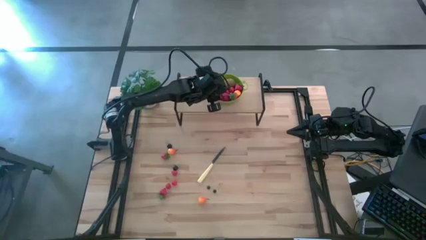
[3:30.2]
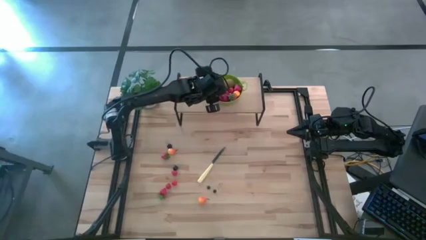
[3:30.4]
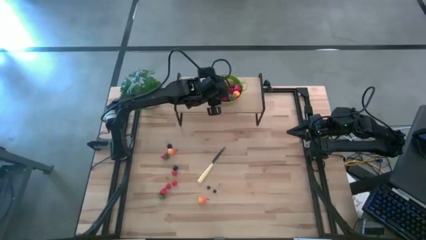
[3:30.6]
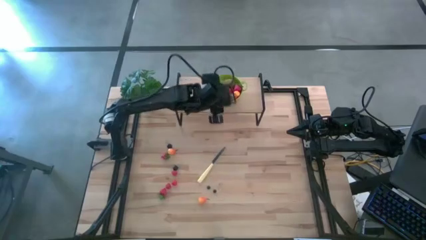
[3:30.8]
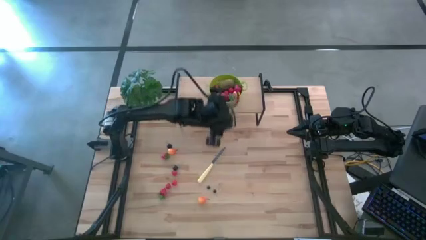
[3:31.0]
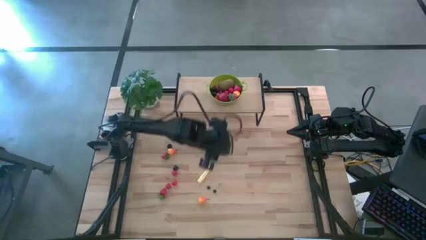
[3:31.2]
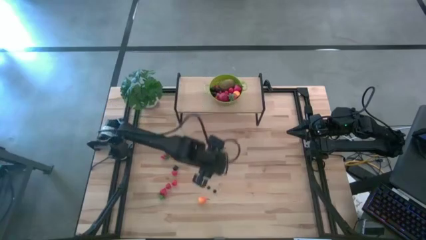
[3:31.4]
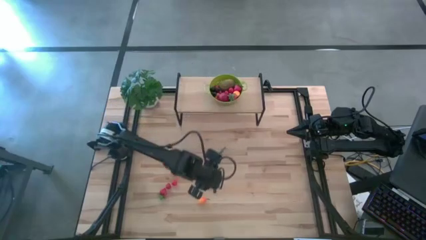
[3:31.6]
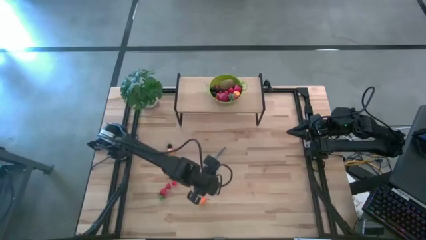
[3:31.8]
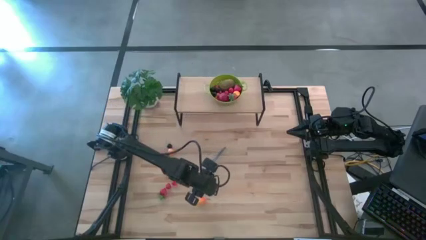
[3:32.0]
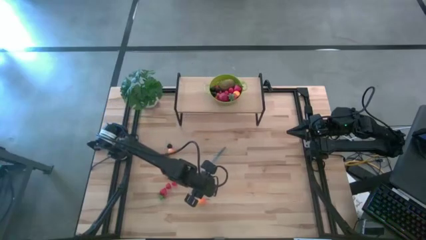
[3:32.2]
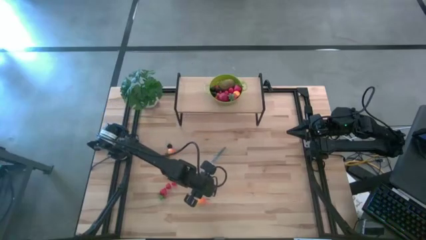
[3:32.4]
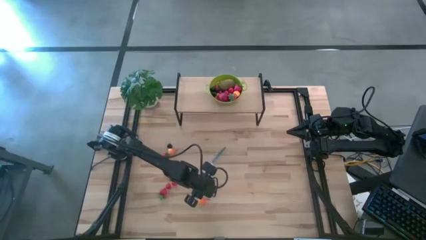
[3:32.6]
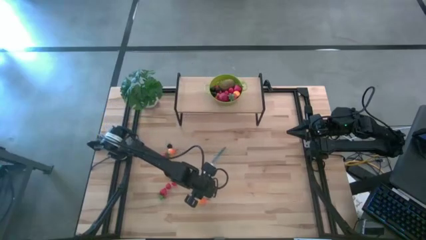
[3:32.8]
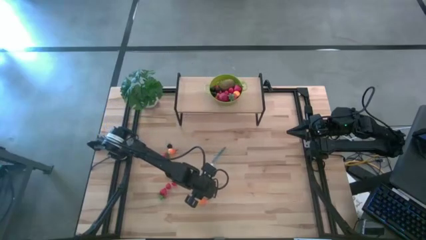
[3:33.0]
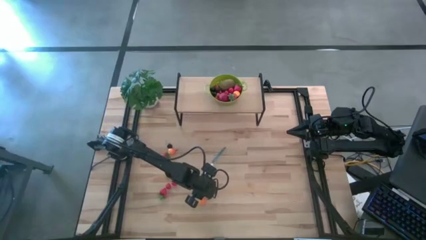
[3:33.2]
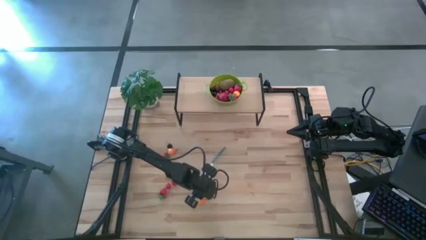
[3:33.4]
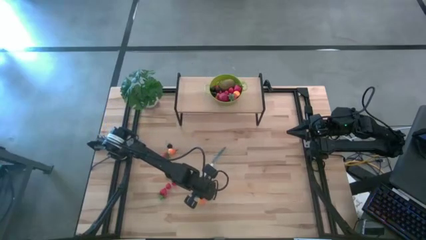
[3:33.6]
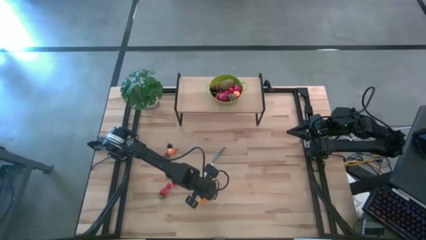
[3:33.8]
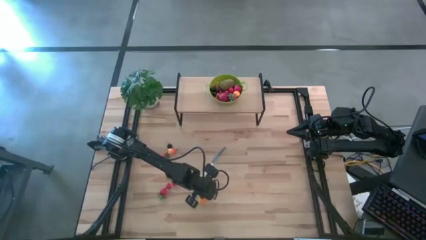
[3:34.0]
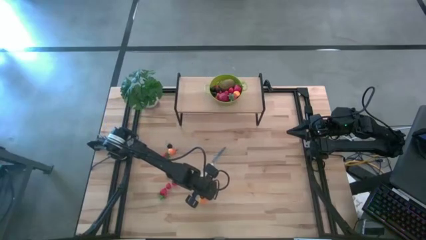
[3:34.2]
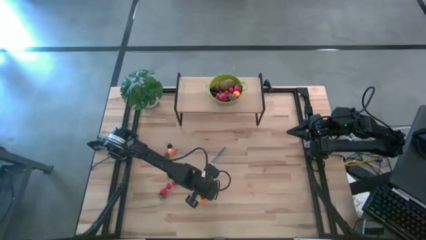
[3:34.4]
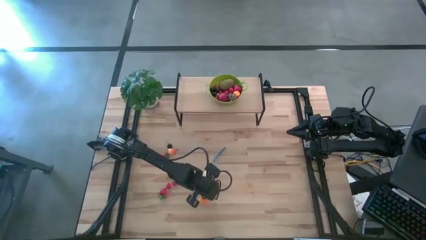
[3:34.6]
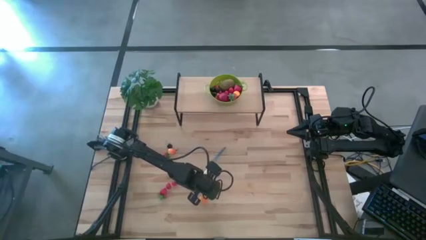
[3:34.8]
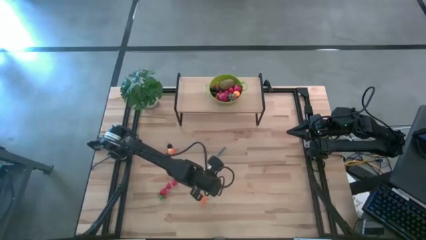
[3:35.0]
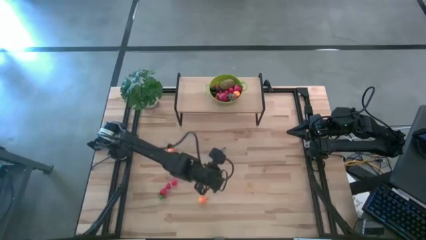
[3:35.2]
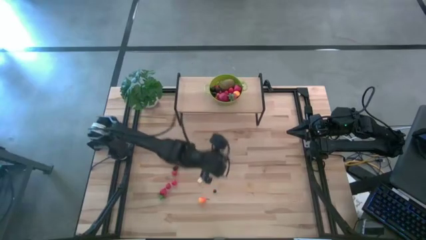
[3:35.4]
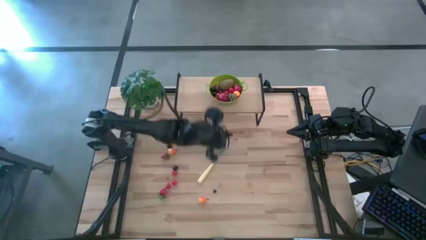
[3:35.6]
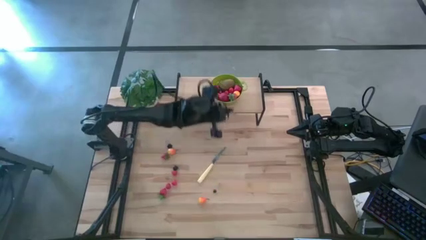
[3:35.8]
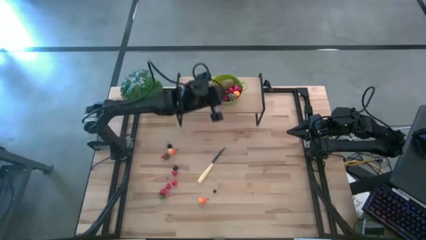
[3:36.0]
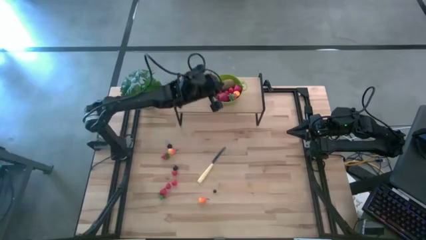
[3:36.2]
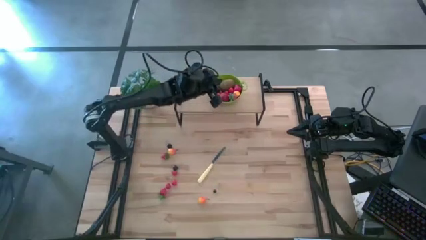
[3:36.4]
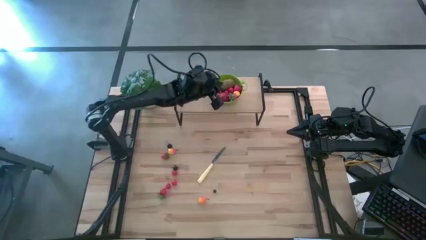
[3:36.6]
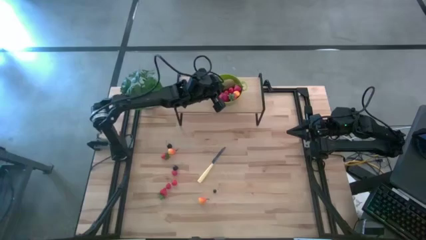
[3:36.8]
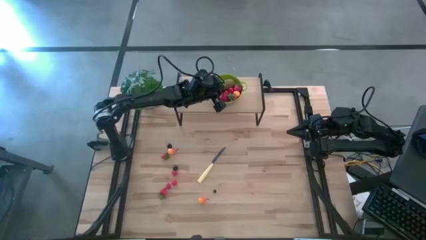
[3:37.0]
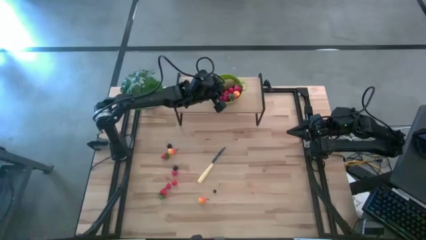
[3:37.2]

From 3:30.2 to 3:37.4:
Task: Pick & Place Fruit
Put the blueberry into the strainer bowl

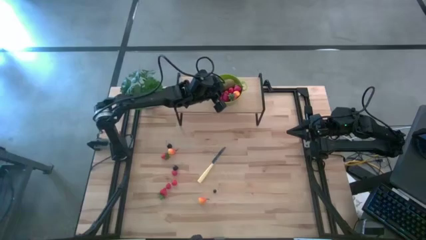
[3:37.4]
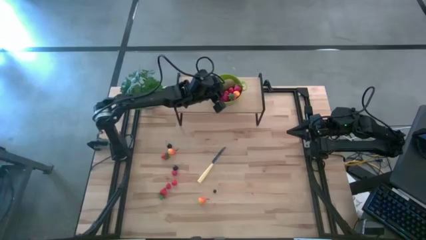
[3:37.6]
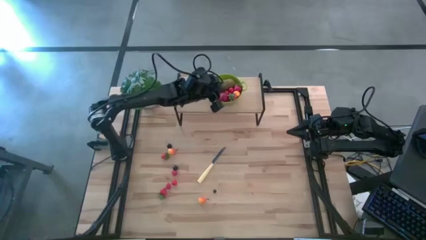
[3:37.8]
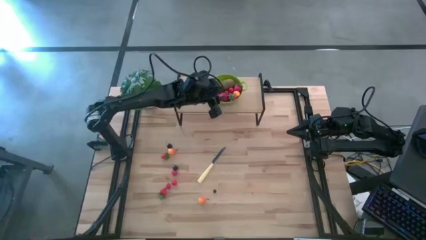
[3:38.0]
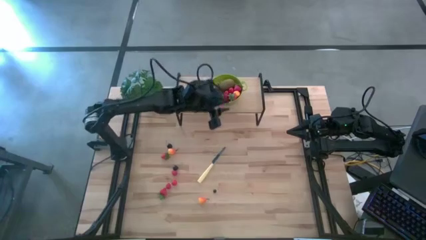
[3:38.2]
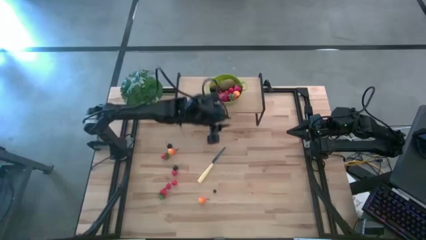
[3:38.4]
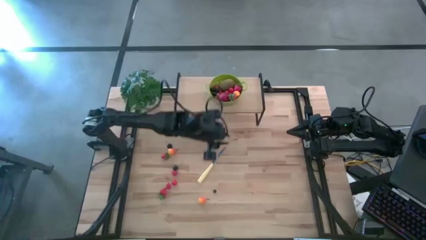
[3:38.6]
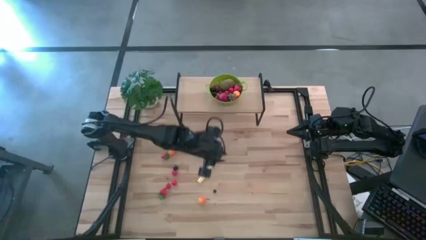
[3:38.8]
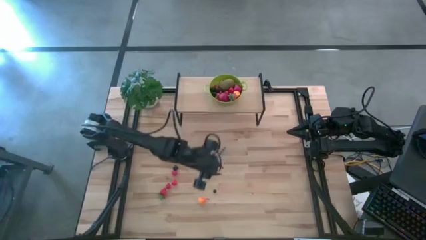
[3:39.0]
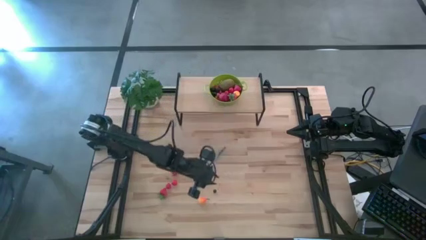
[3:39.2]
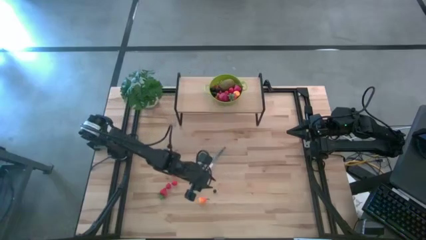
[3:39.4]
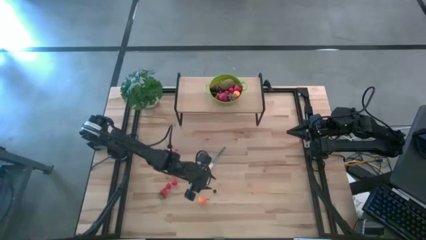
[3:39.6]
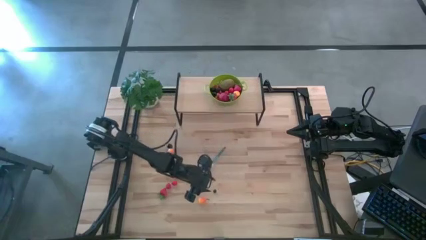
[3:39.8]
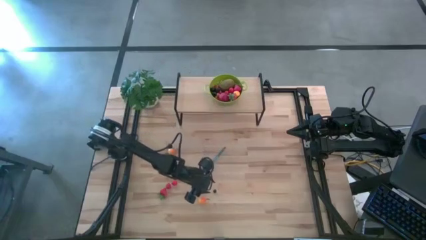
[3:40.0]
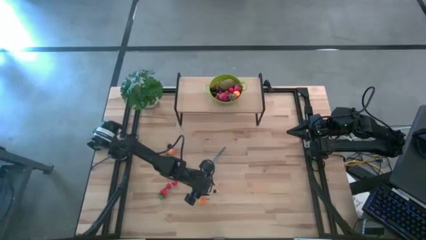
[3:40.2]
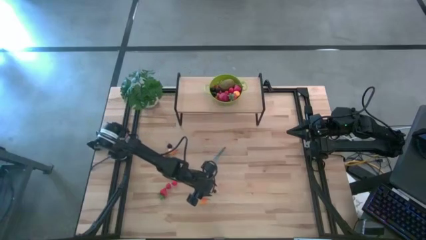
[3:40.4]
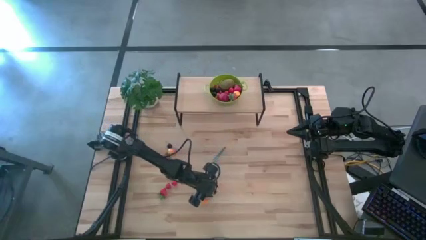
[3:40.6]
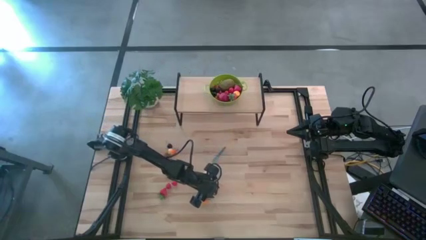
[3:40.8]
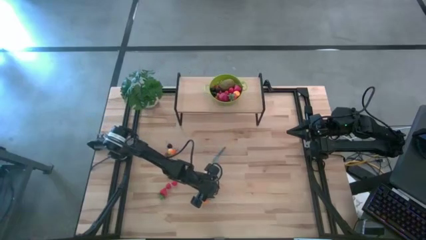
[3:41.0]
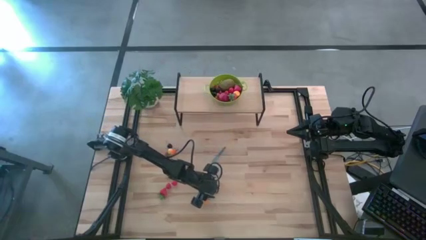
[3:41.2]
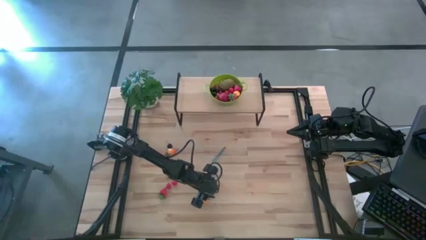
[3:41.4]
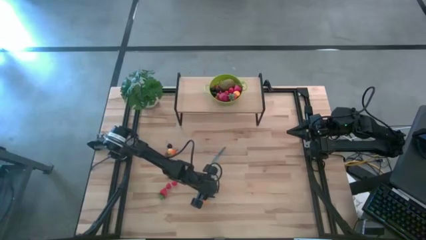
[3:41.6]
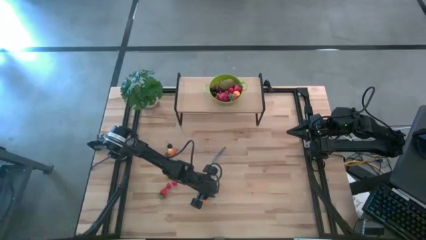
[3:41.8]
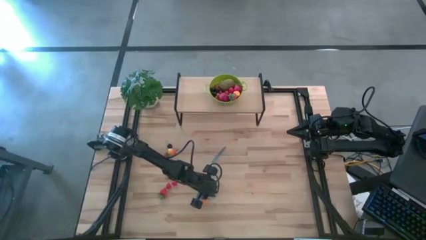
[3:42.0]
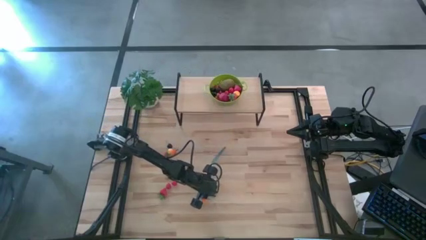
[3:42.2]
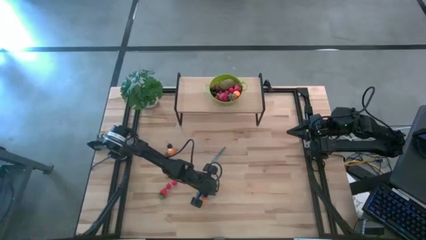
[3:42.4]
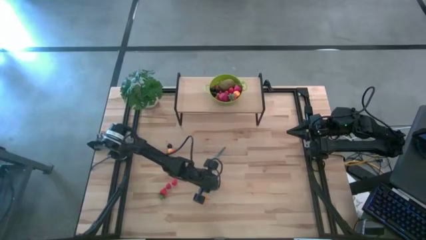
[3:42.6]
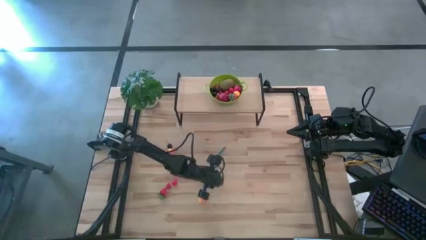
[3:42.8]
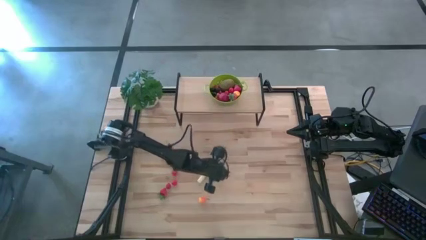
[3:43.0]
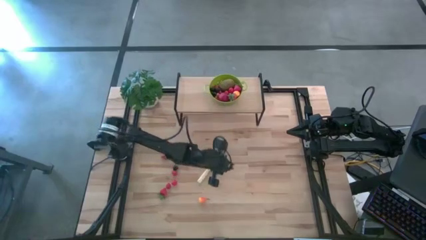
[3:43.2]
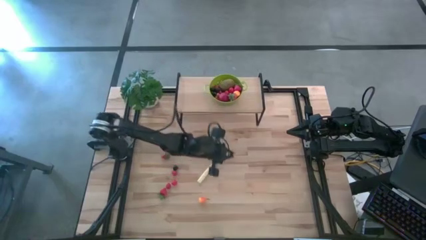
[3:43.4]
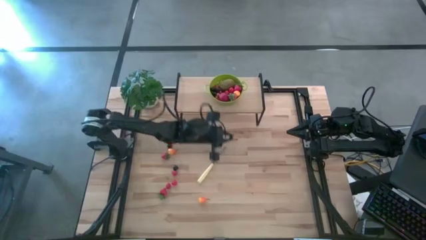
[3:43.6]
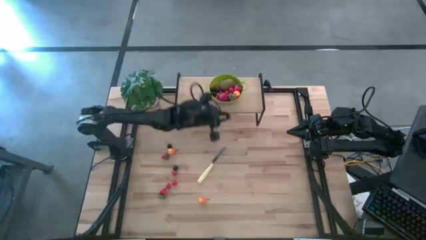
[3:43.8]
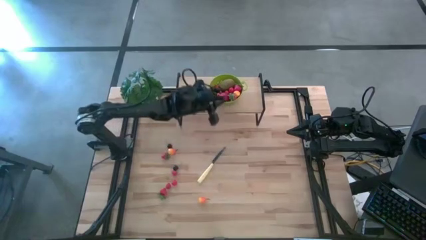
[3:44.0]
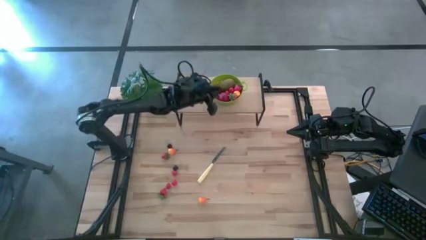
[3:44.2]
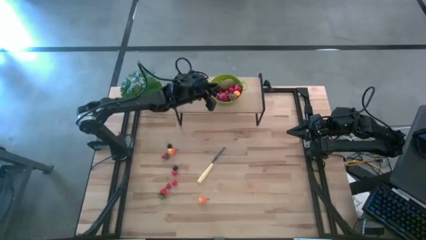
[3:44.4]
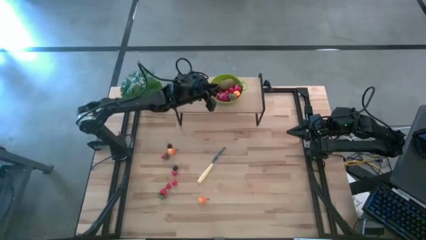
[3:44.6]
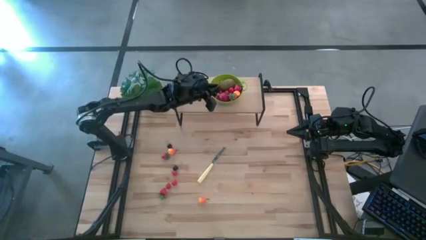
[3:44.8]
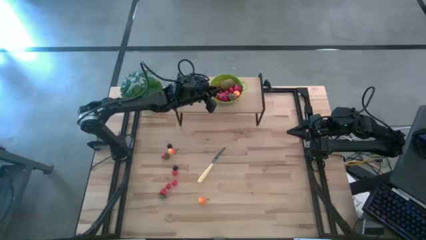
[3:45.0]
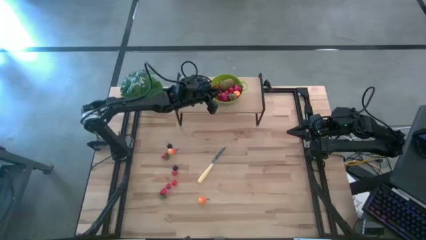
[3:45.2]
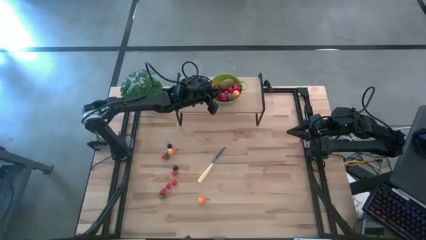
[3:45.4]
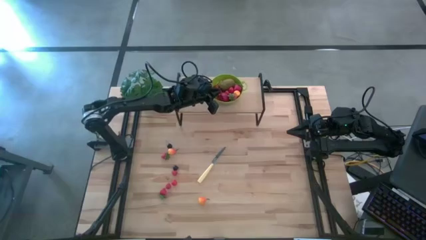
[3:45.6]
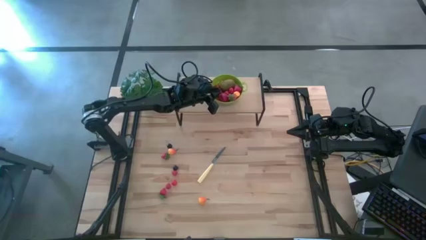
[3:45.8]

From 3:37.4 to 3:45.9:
Put the blueberry into the strainer bowl

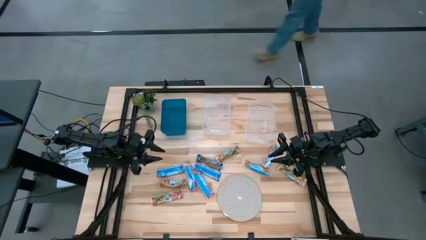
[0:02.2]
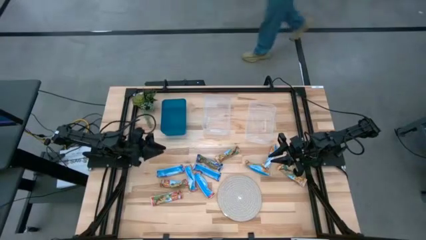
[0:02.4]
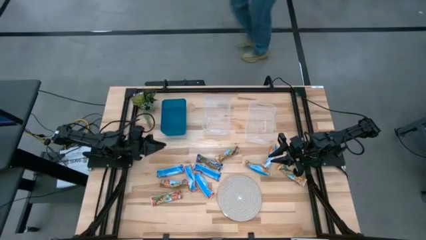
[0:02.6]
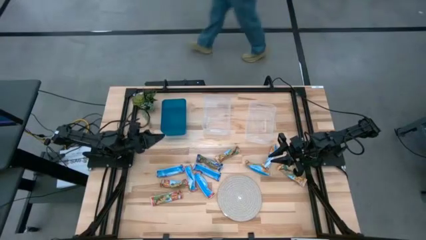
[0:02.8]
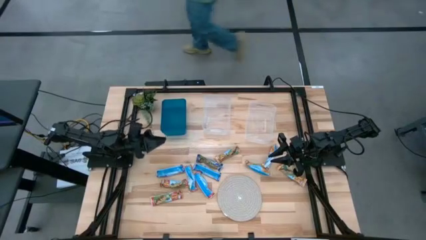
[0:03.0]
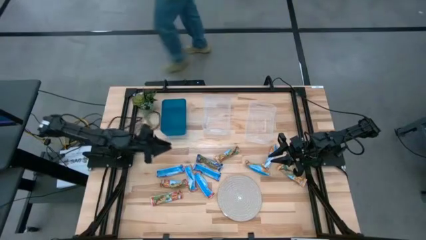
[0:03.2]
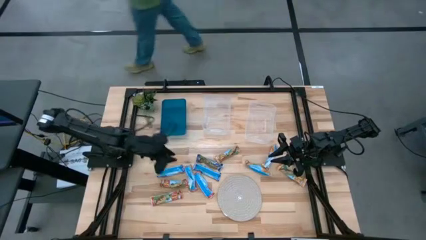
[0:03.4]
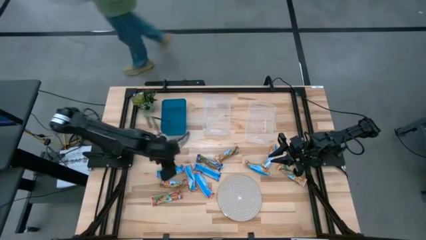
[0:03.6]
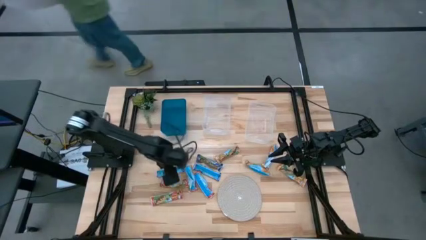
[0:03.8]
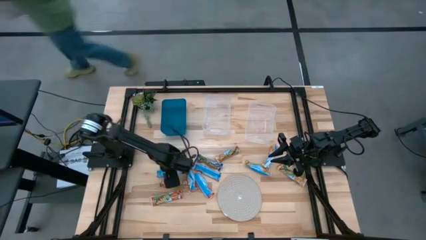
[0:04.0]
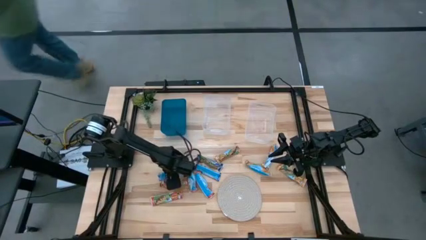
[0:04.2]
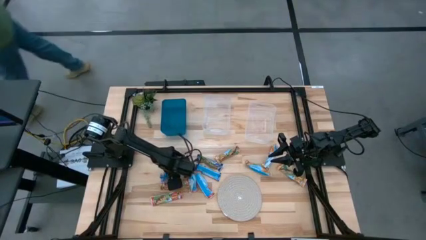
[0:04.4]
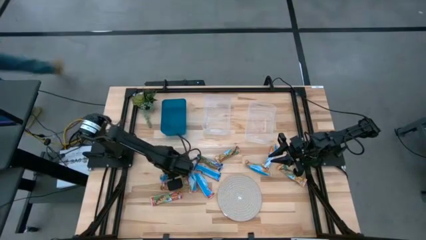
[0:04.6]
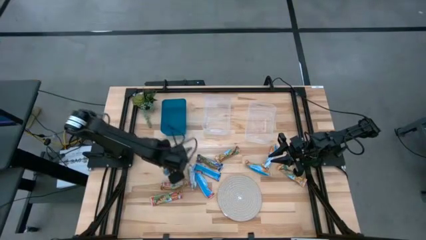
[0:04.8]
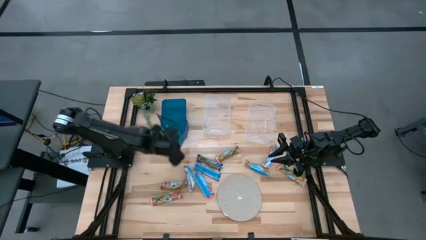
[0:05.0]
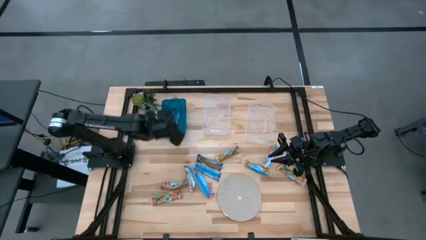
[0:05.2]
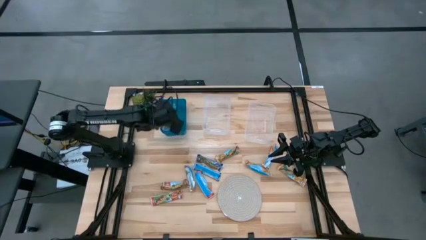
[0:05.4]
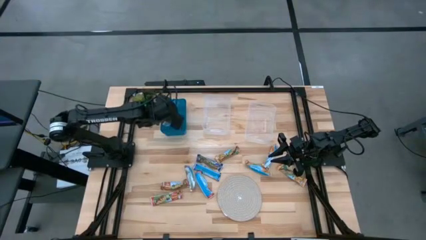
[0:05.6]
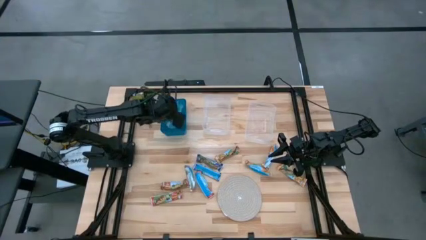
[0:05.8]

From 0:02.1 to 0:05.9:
Task: Pick and place Granola Bars by type
Put the blue granola bar into the blue bin
